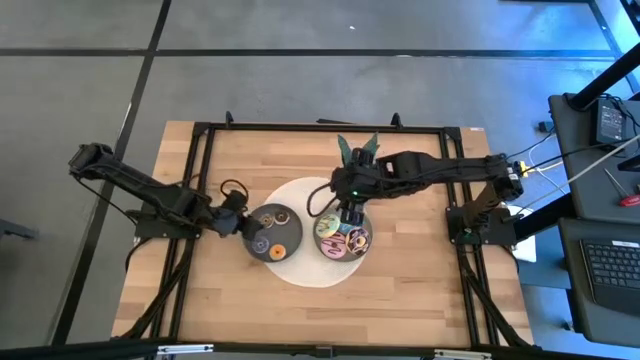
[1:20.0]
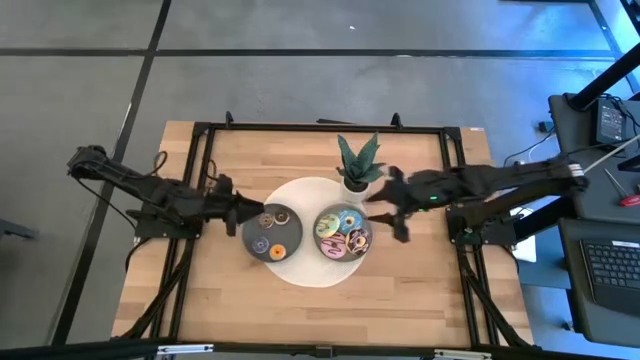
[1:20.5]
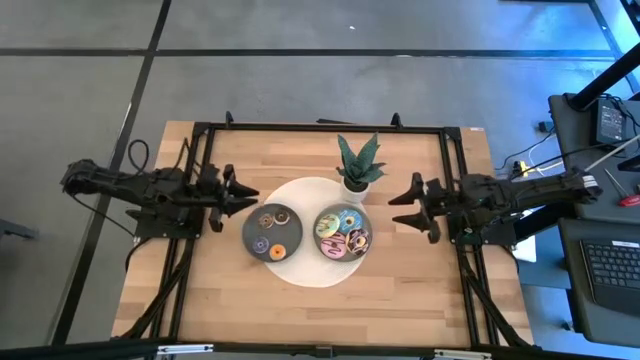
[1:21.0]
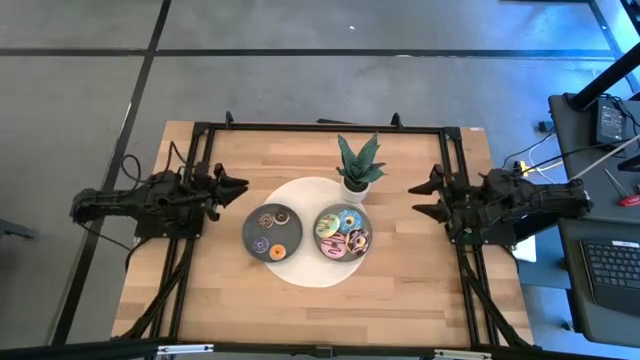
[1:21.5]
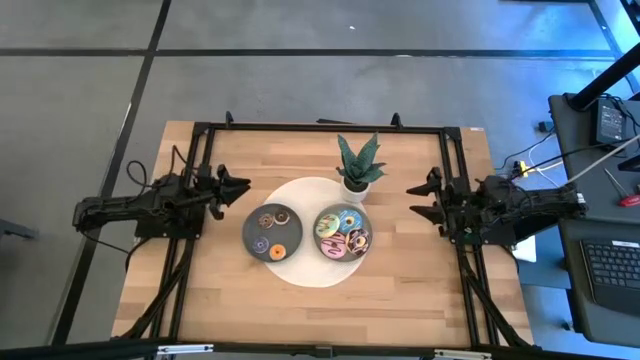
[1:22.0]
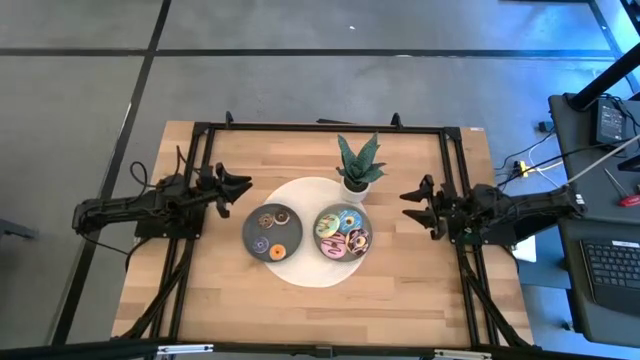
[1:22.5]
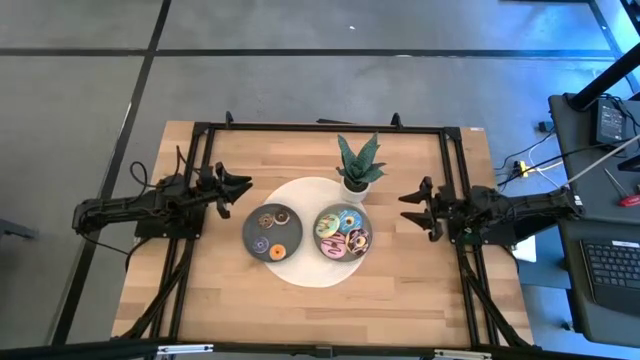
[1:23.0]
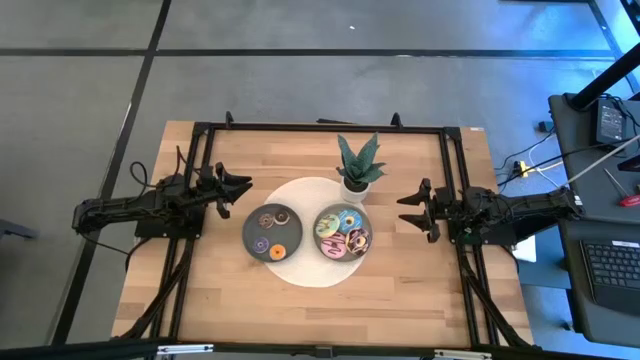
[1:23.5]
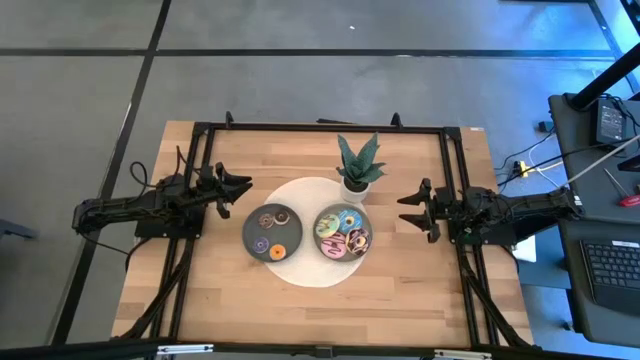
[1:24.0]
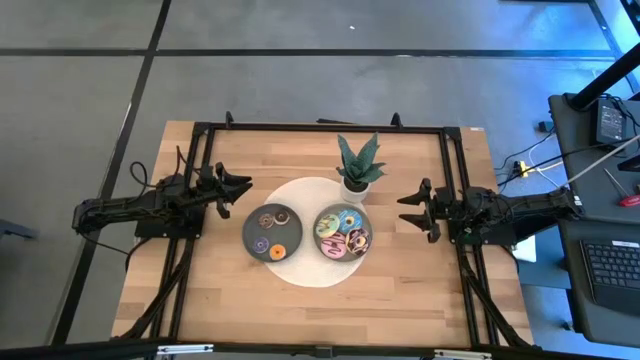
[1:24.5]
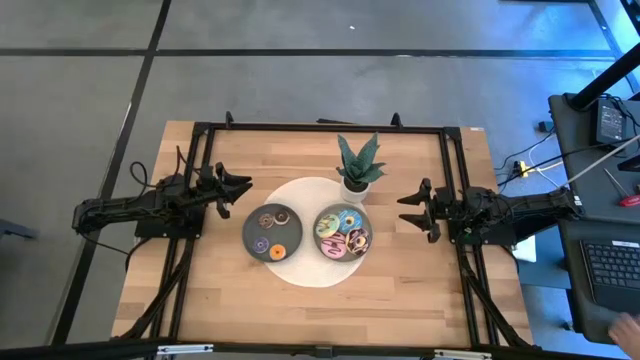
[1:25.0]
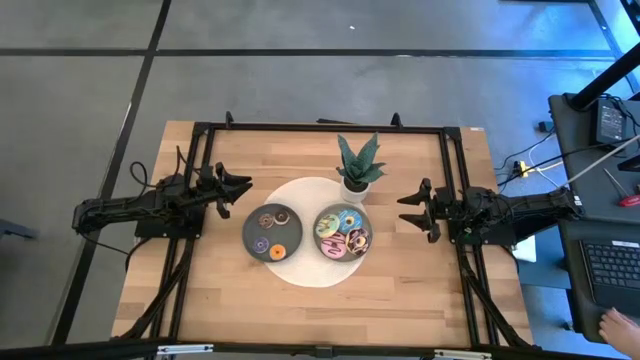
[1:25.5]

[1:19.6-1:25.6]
Task: Pick & Place donuts
Return to Home Position

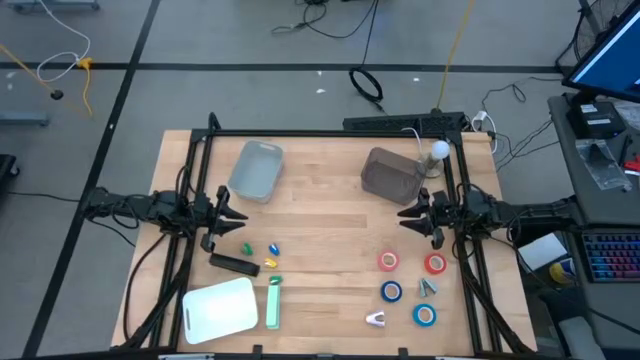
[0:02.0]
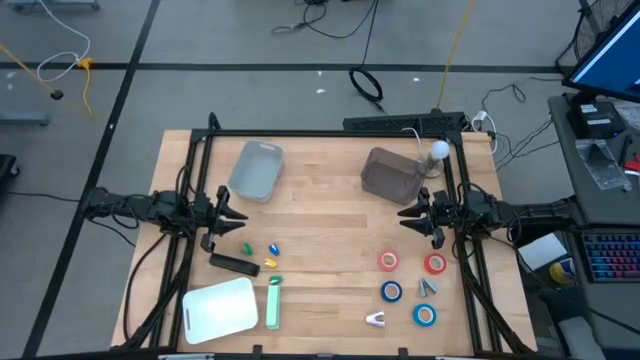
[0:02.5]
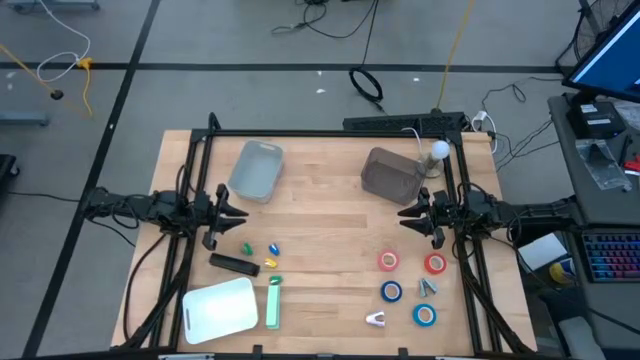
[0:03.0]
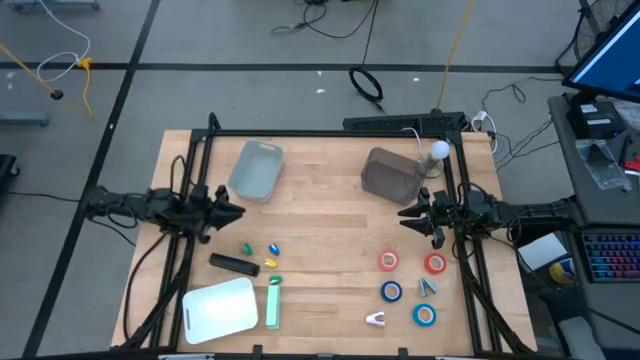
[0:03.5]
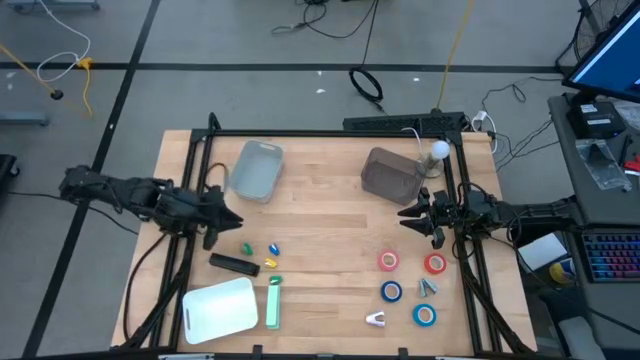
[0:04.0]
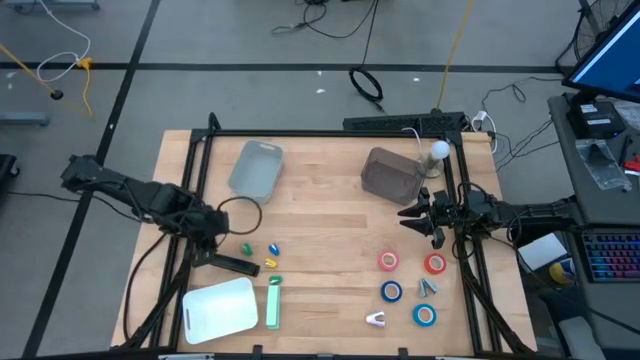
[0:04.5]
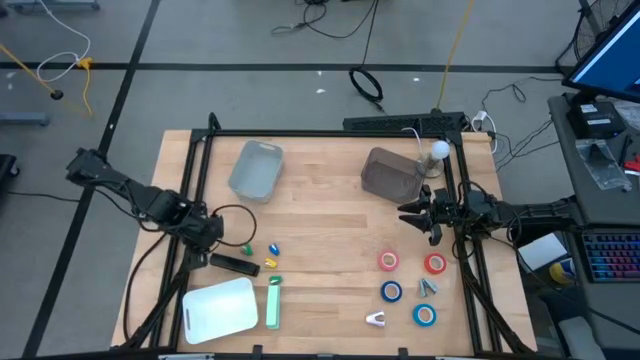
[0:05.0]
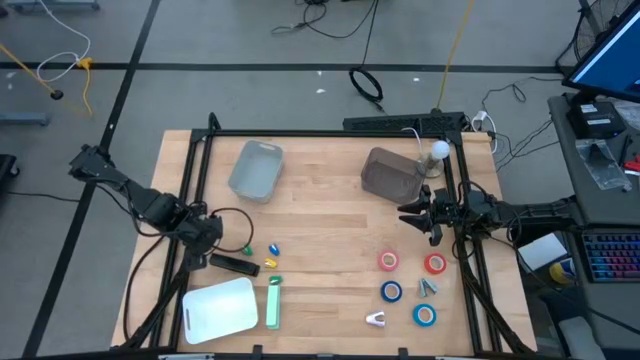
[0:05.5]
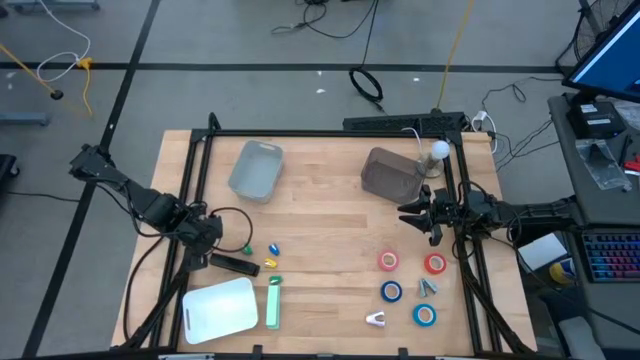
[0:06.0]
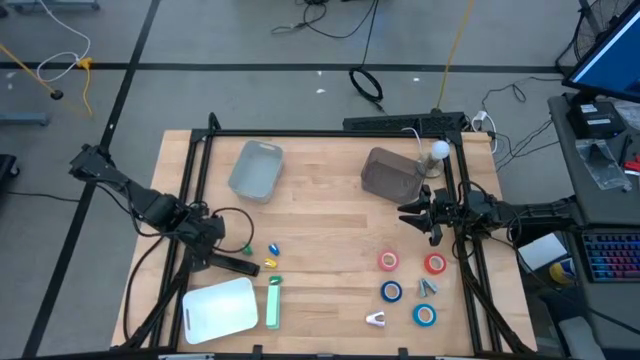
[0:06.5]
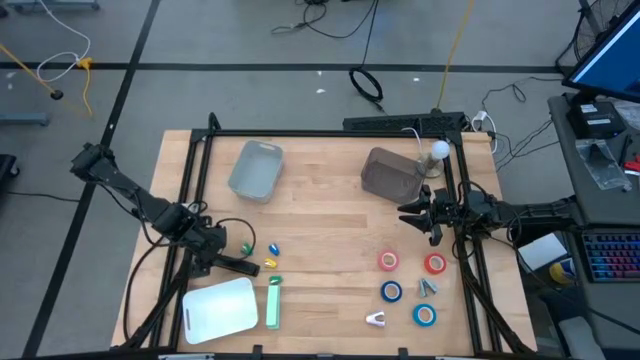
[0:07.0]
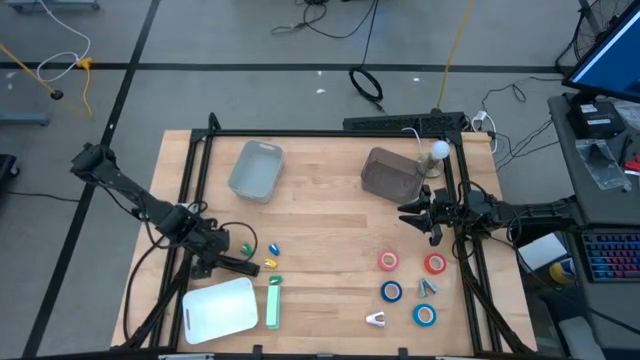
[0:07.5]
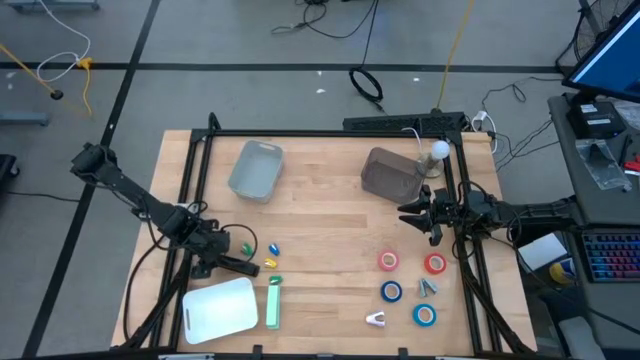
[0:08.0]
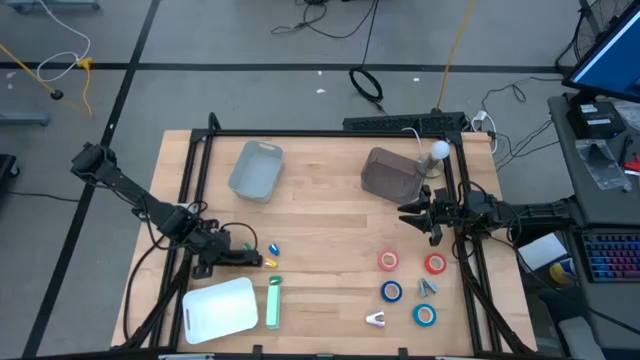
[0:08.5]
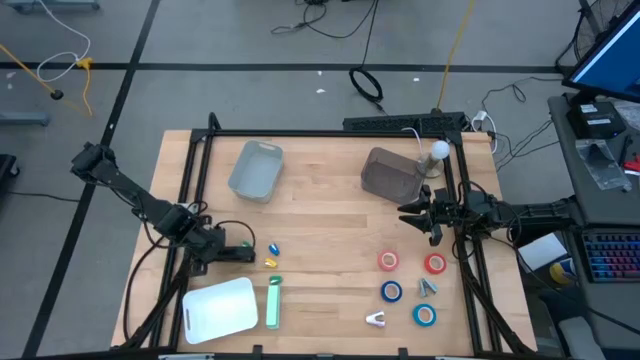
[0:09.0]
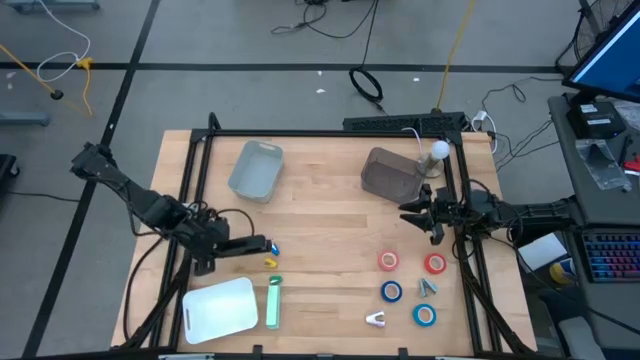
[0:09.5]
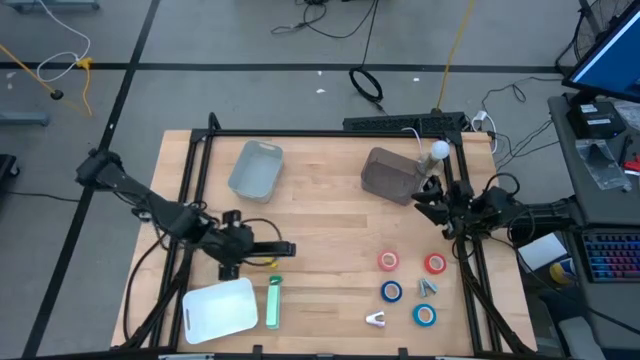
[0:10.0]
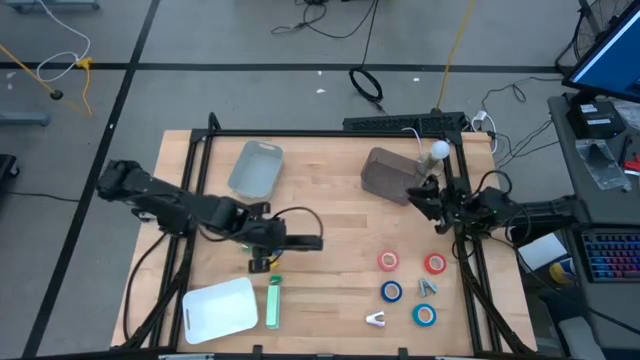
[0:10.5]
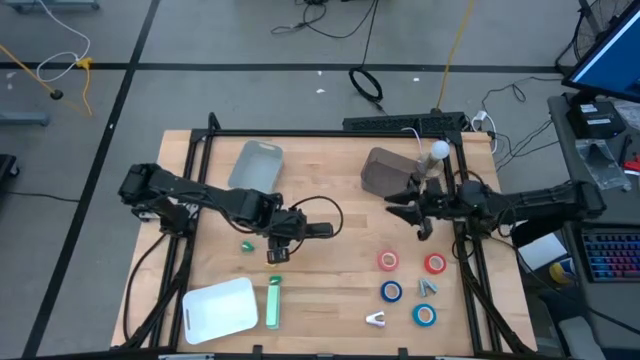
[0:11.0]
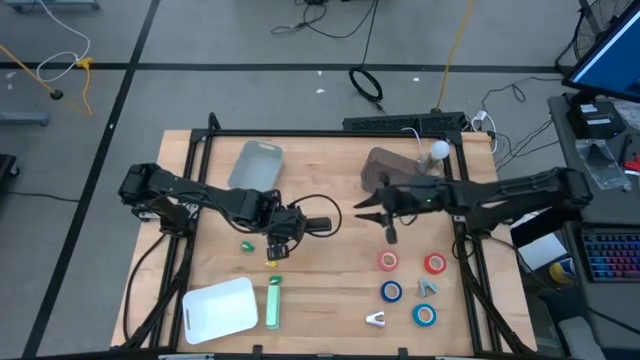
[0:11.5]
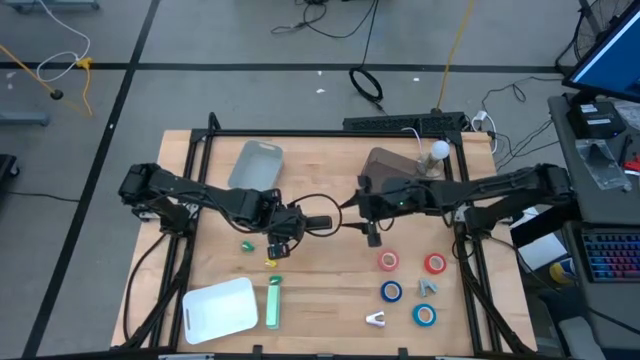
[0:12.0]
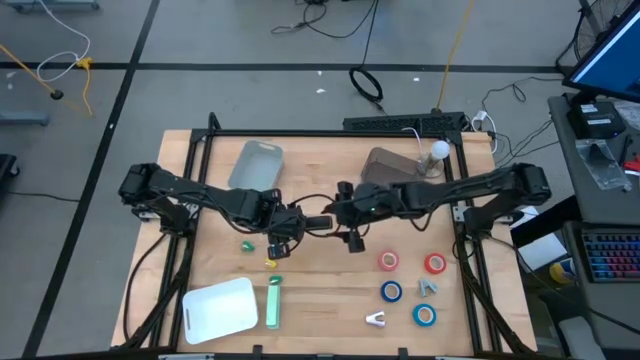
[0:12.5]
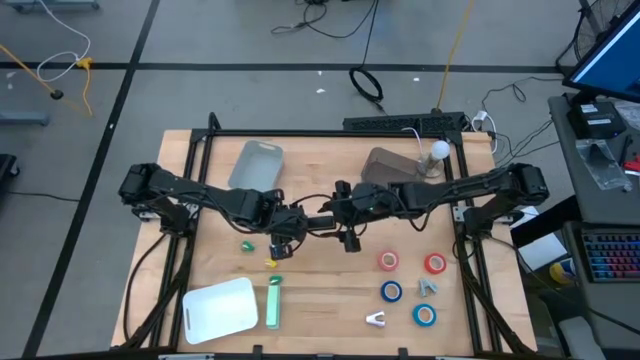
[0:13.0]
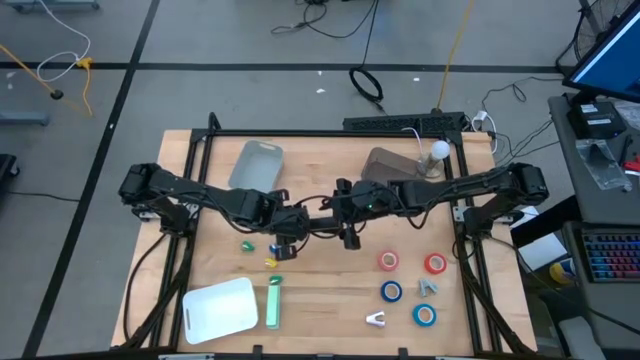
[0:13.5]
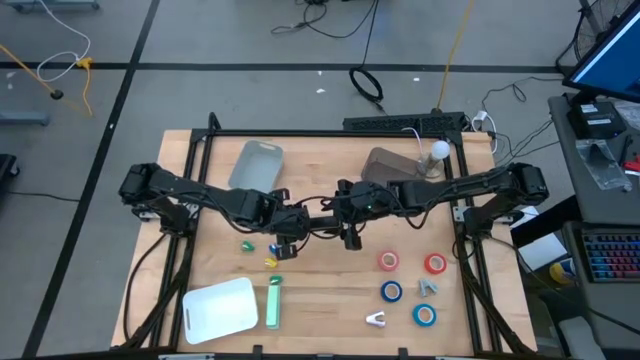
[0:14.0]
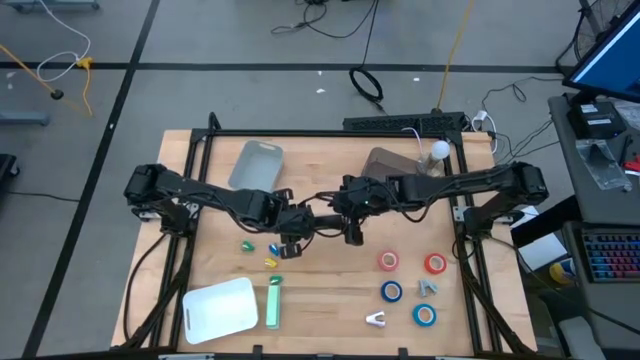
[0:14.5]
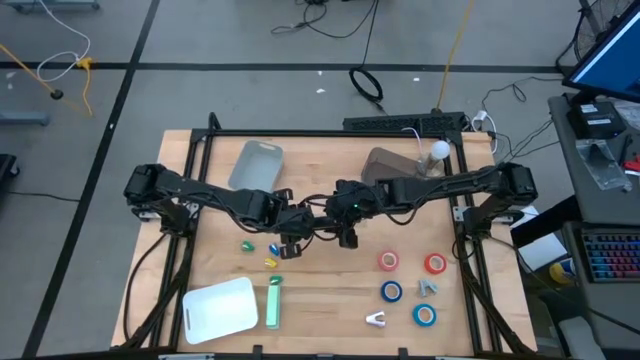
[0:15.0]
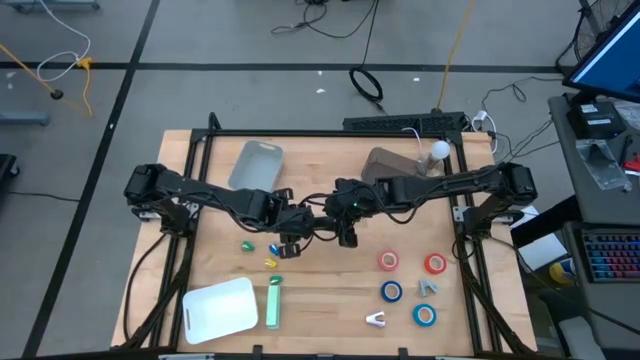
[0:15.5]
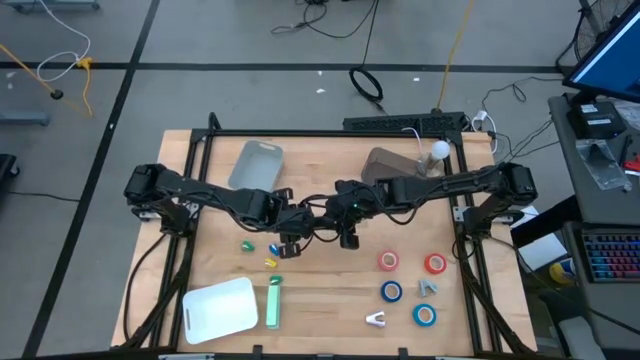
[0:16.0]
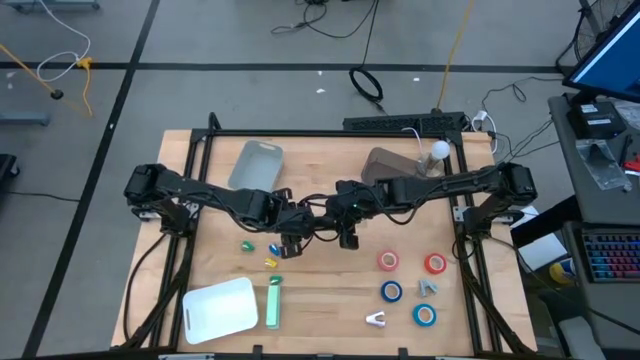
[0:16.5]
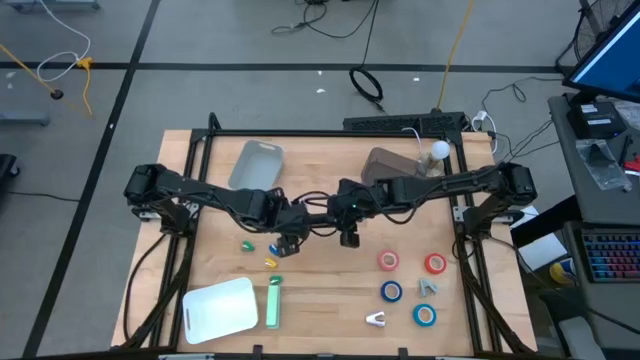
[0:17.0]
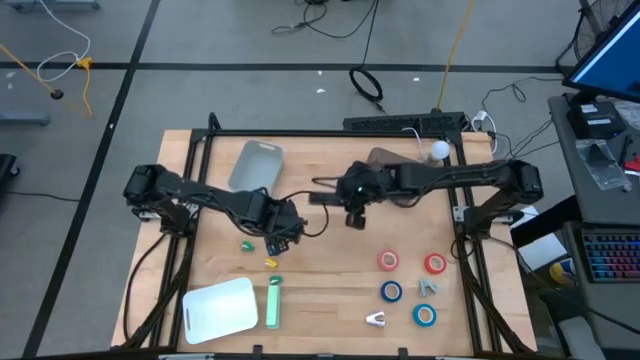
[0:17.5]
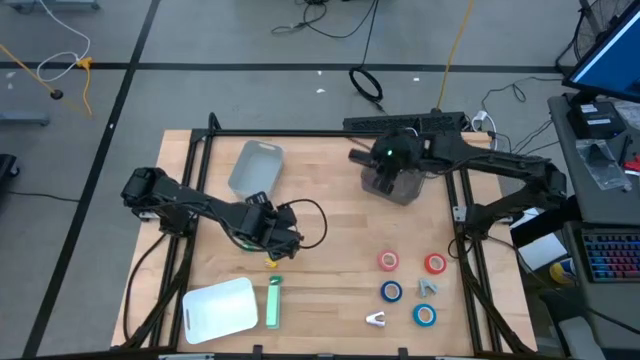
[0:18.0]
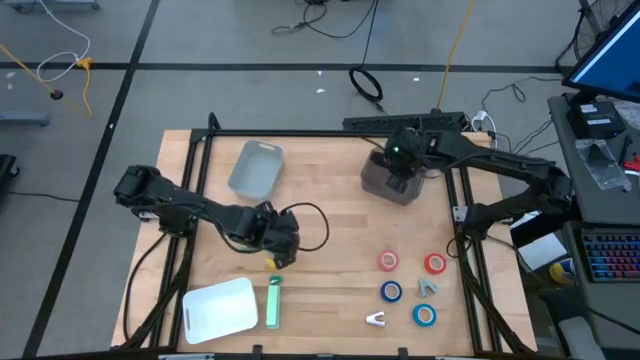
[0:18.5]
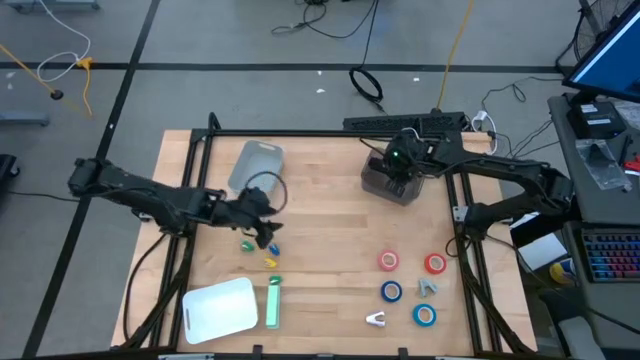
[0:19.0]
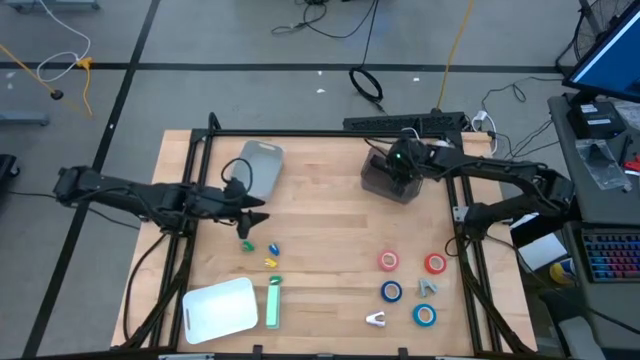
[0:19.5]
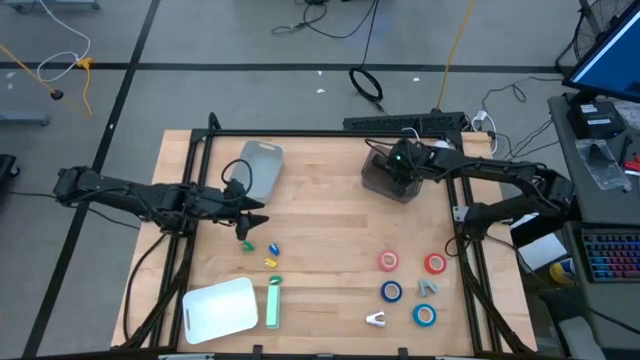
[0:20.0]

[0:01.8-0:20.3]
Task: Pick and place Stapler, Stapler remover, tape
Put the big black stapler into the black bin
